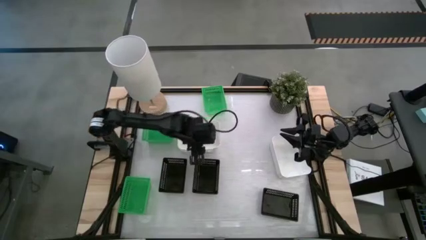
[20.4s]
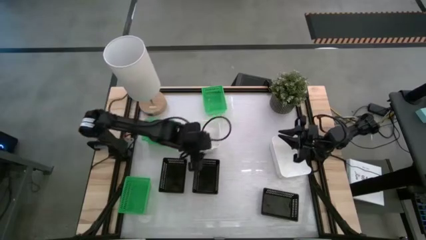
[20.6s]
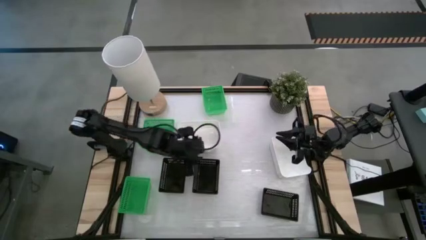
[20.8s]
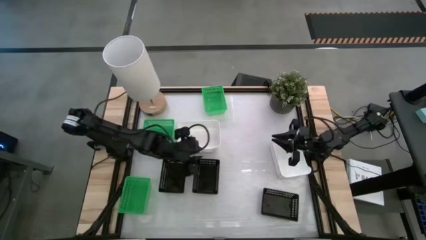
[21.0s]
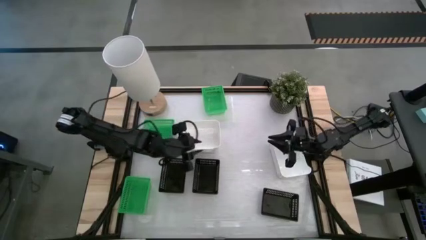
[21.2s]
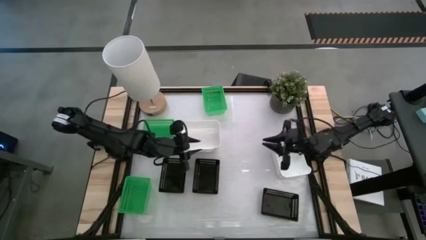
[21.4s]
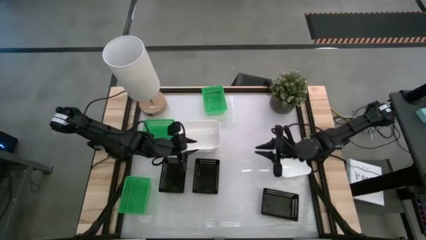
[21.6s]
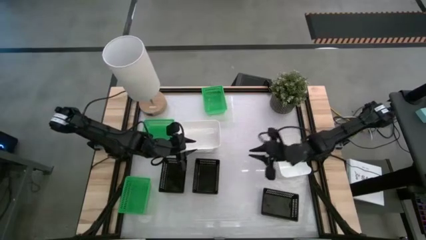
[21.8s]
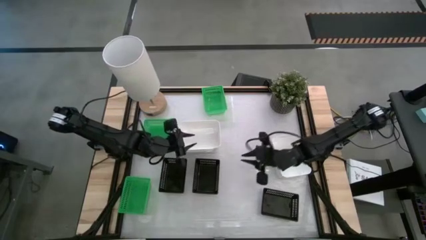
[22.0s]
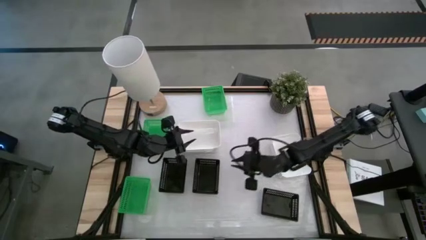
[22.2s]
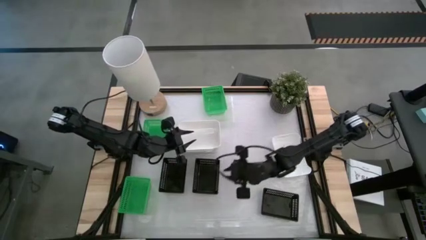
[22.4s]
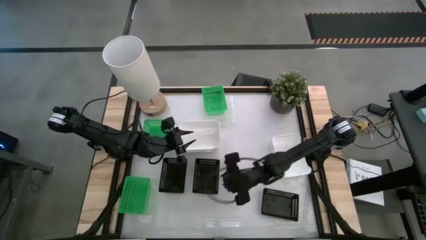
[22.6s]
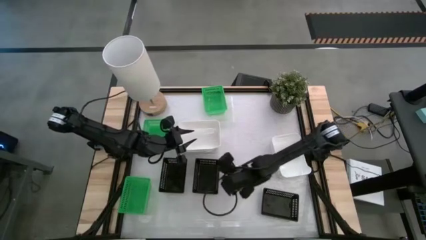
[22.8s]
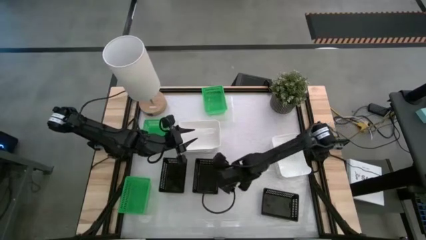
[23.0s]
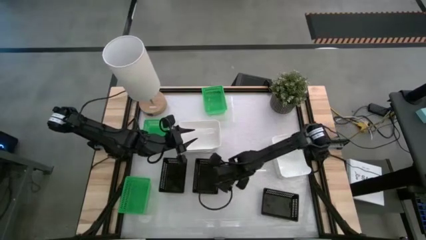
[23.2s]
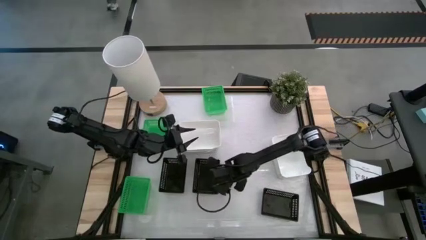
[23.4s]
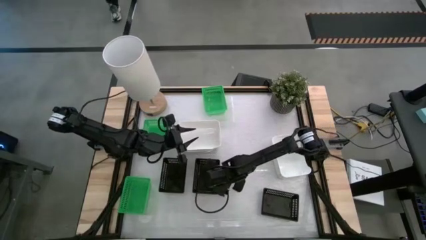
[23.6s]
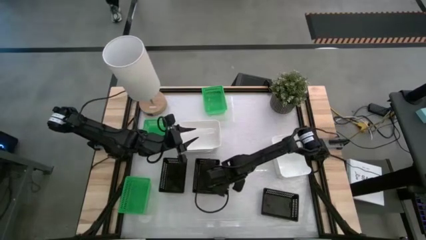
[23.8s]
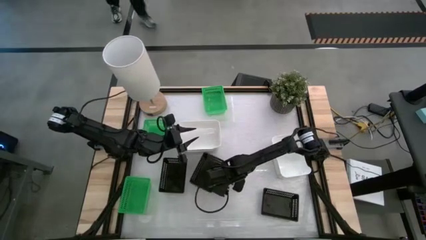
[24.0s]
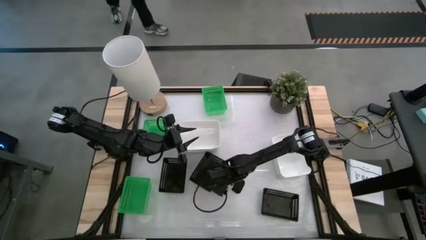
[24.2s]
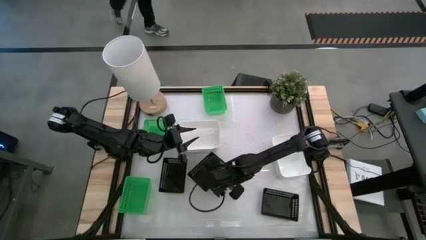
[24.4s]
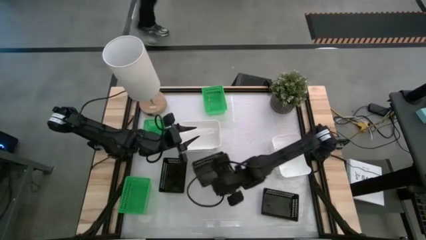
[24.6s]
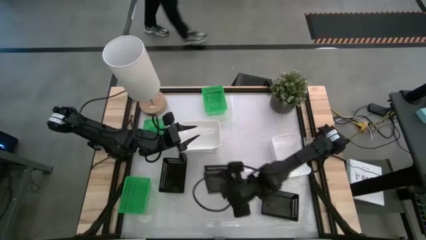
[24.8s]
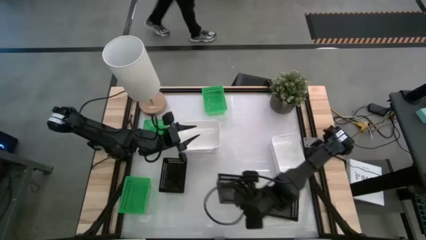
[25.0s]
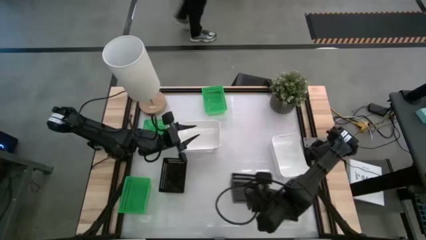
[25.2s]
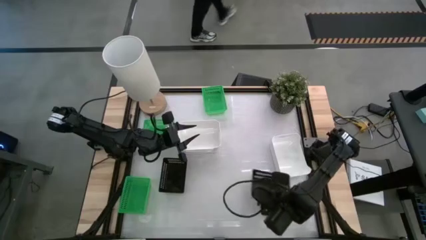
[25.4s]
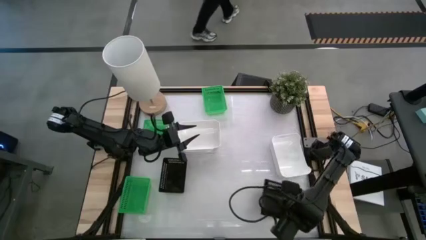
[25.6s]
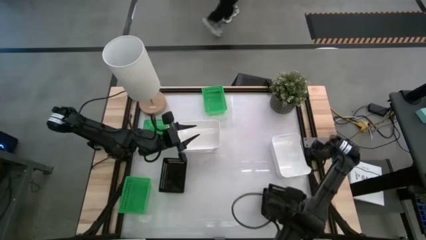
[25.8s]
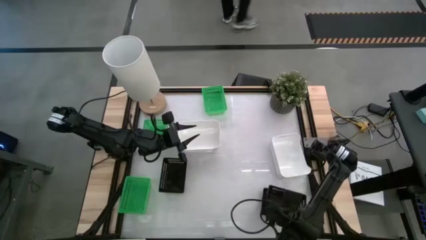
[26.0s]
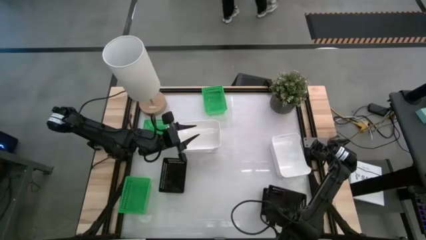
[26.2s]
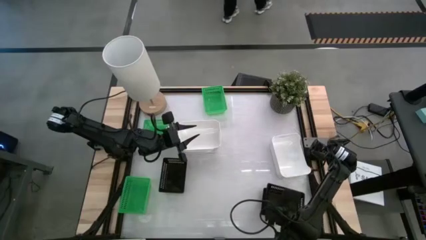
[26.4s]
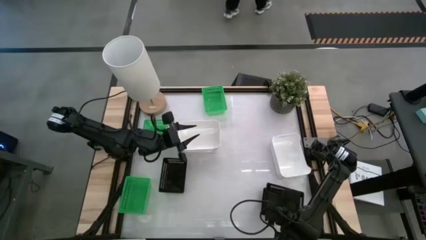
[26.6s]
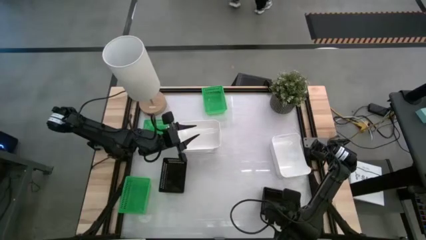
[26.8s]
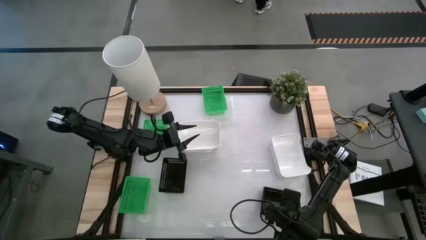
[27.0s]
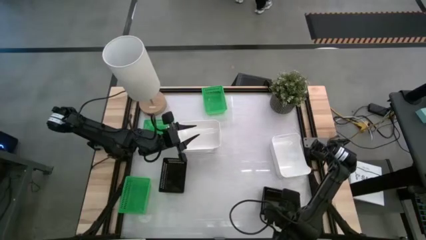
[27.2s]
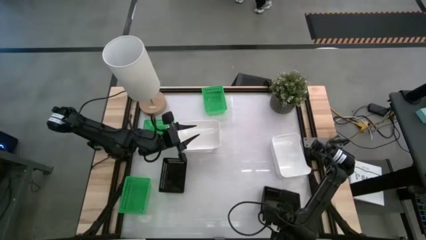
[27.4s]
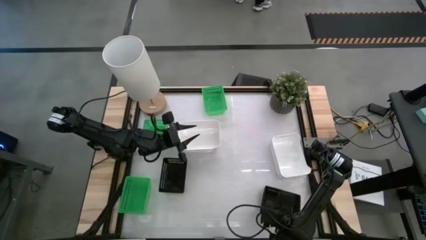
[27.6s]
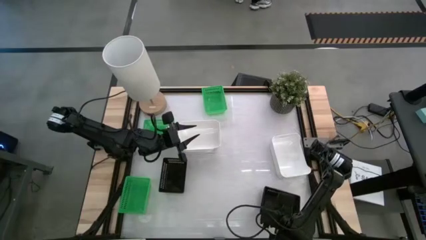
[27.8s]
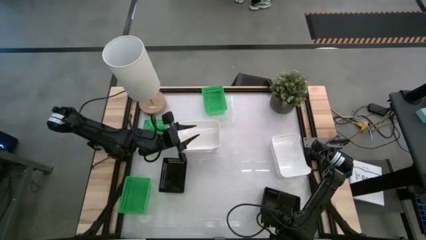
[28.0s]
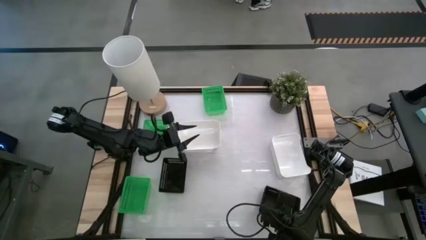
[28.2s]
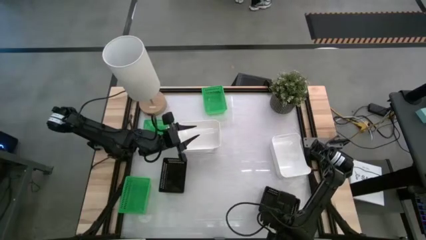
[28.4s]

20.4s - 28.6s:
Stack the center black bin on top of the bottom black bin

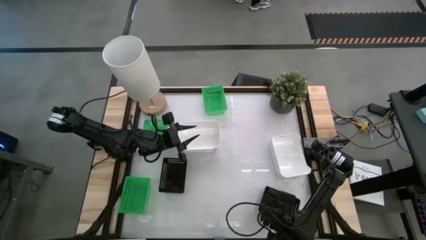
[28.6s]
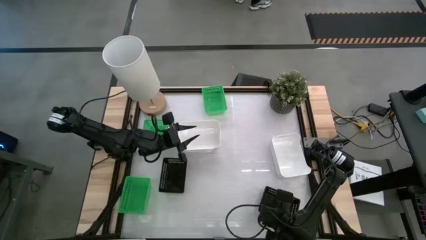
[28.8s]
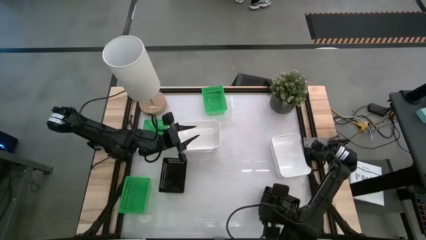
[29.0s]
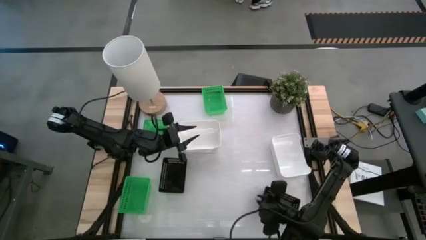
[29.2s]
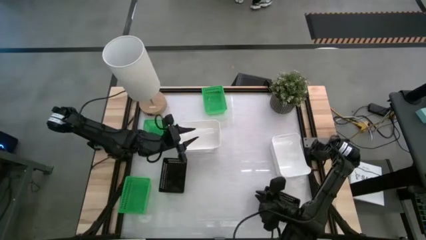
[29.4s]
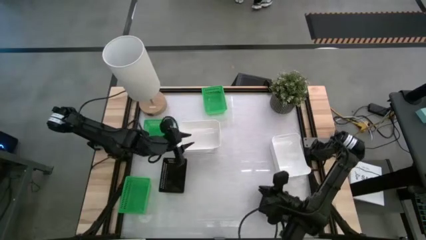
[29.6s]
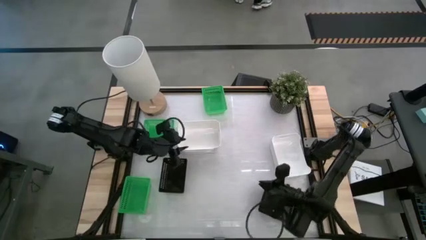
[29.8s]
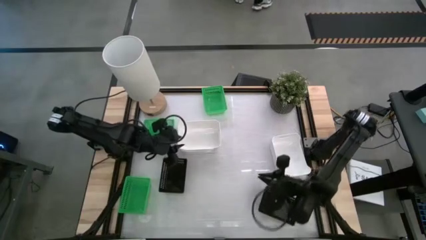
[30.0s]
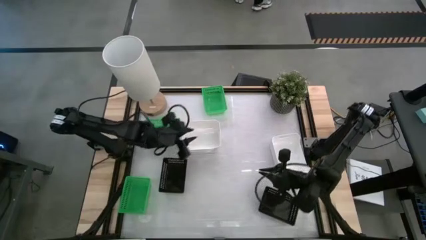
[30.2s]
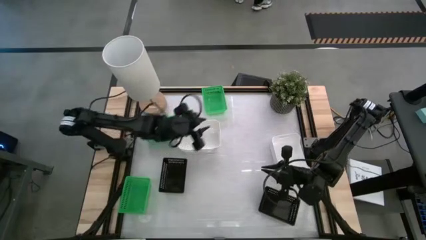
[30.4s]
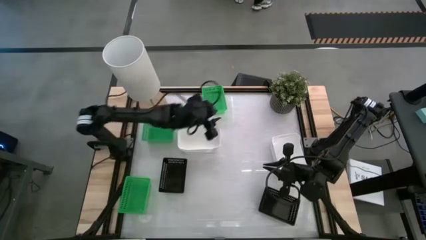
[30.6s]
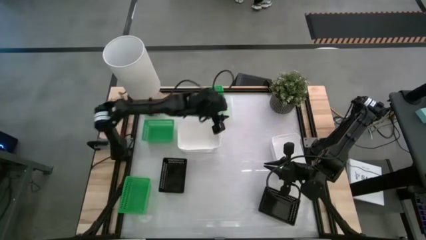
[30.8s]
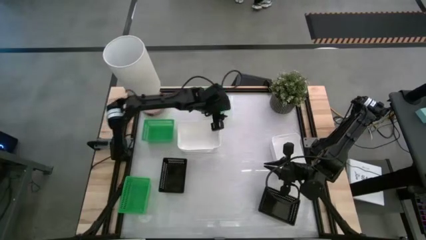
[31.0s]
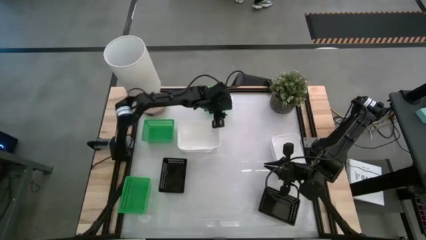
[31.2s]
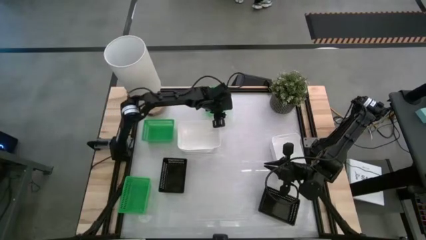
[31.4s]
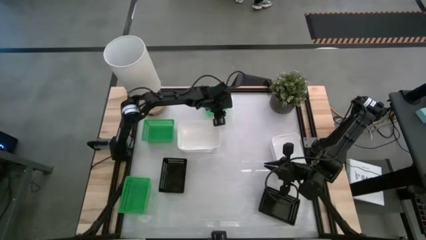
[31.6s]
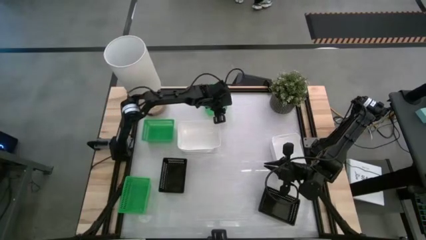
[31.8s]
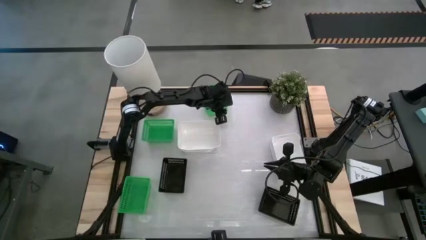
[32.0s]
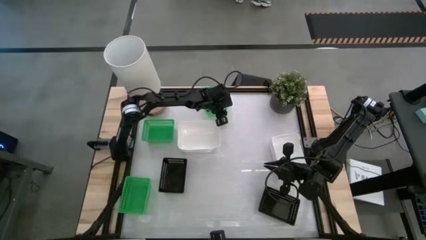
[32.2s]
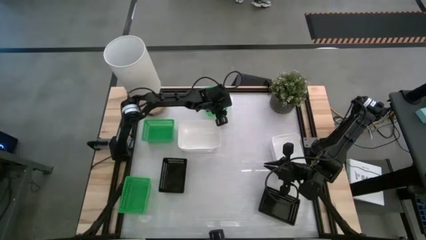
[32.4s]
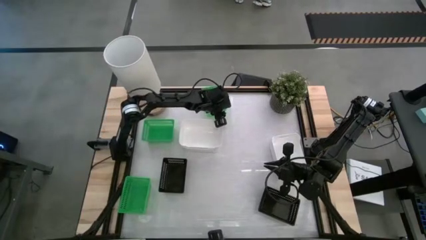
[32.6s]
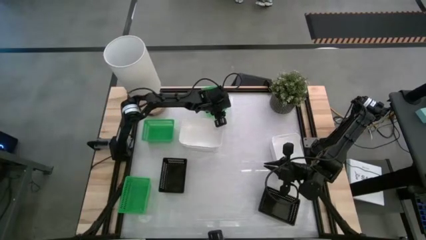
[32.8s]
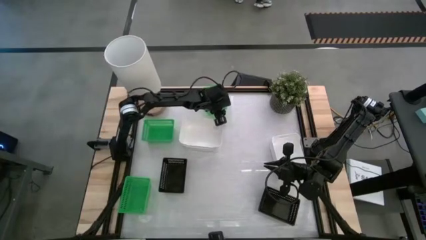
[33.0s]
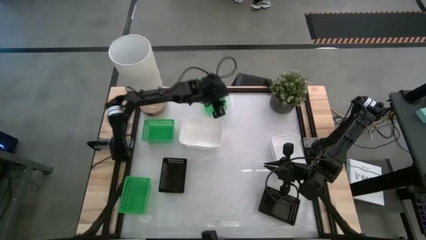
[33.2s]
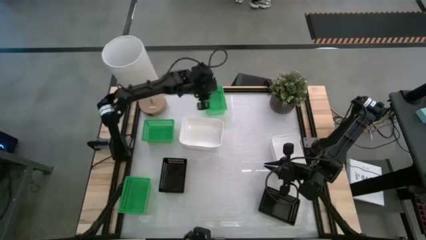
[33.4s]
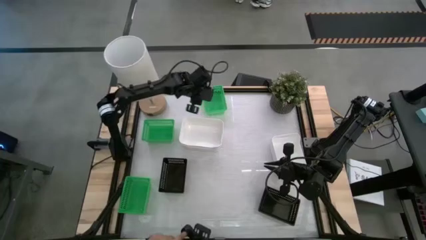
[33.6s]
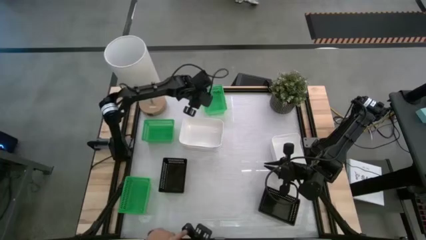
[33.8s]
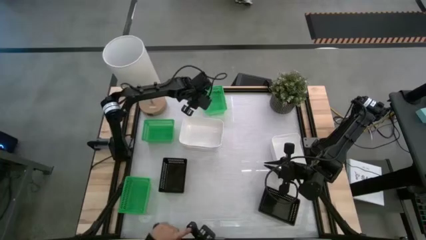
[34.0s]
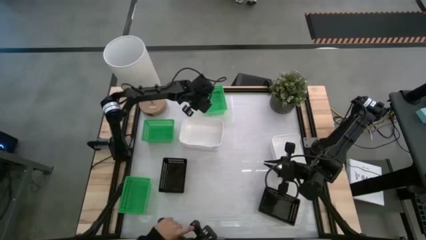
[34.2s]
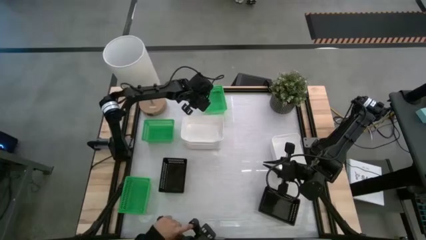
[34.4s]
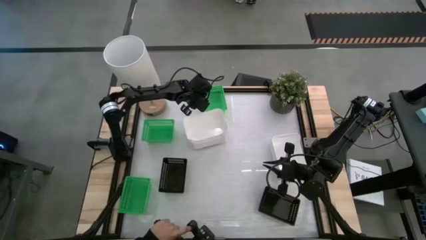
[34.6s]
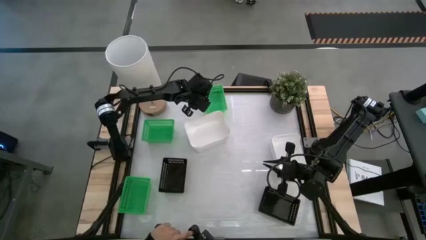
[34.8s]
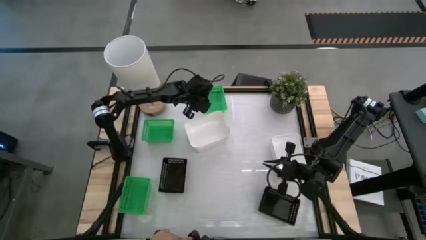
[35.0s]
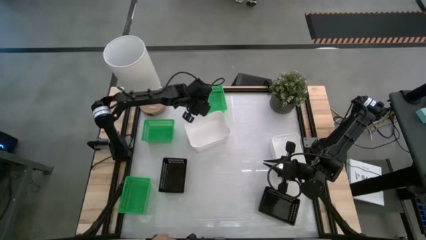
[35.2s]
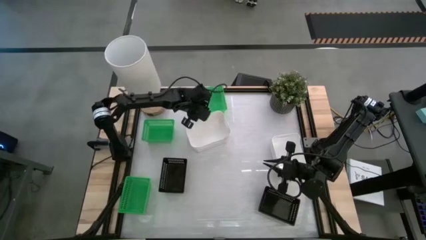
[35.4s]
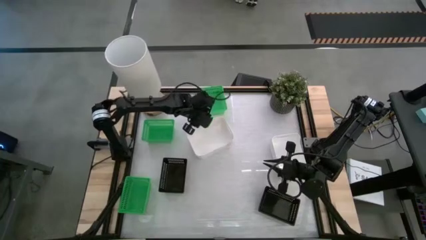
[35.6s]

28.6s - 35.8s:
Adjust the stacked white bins on the table
